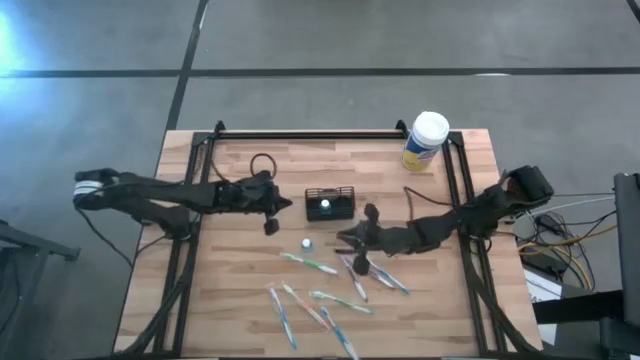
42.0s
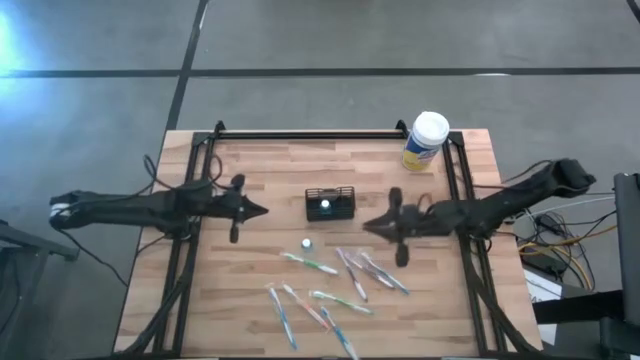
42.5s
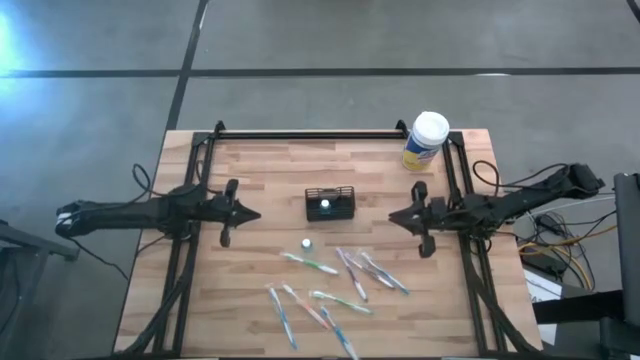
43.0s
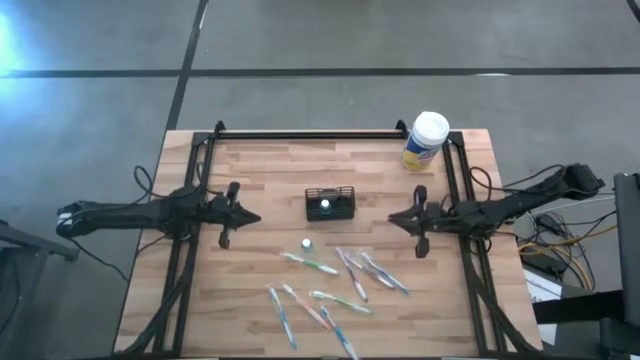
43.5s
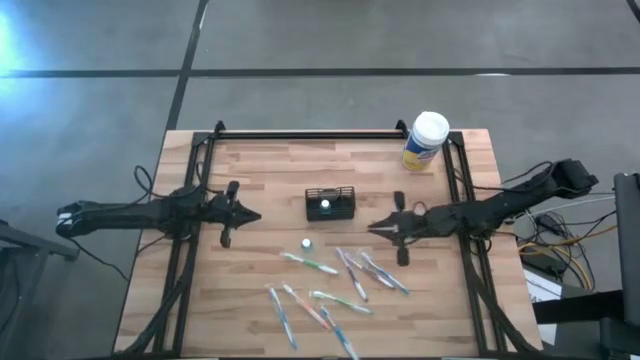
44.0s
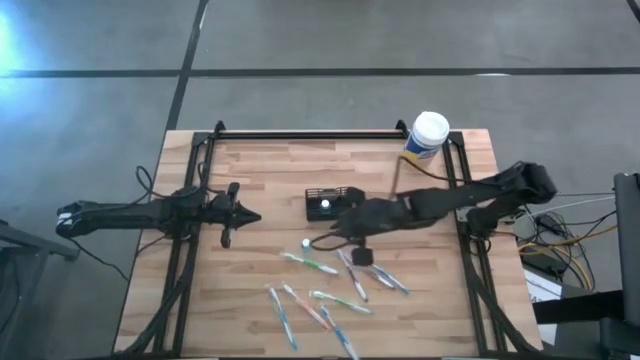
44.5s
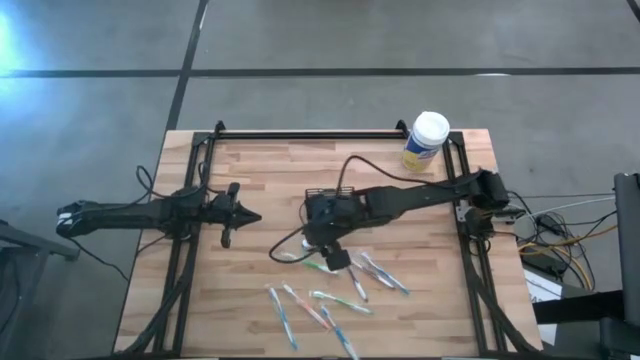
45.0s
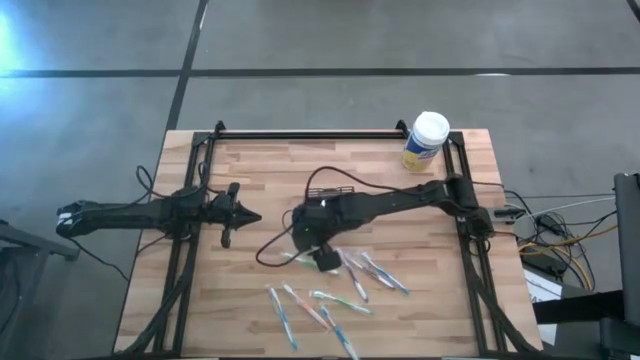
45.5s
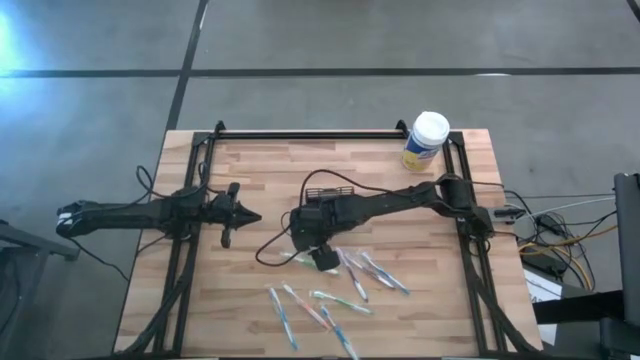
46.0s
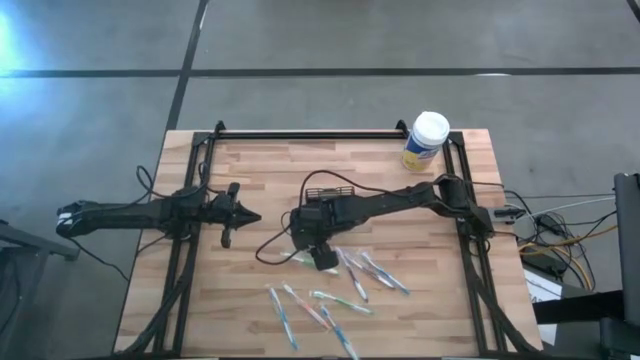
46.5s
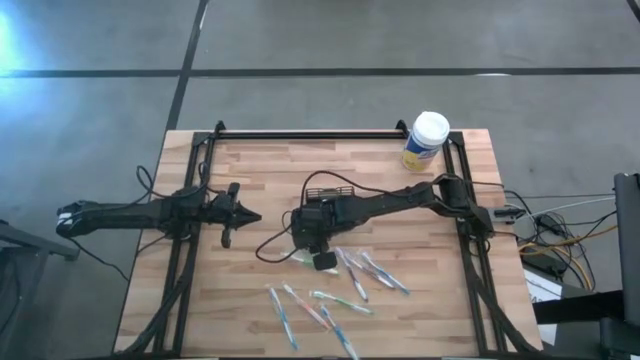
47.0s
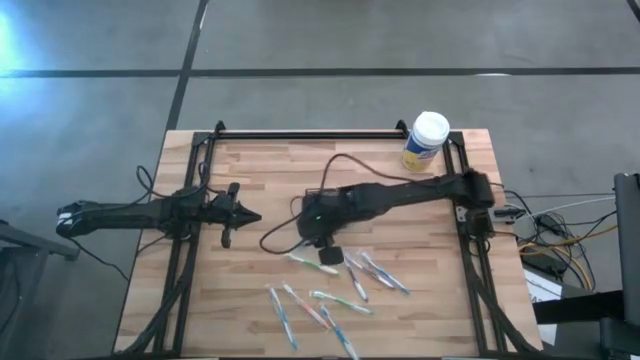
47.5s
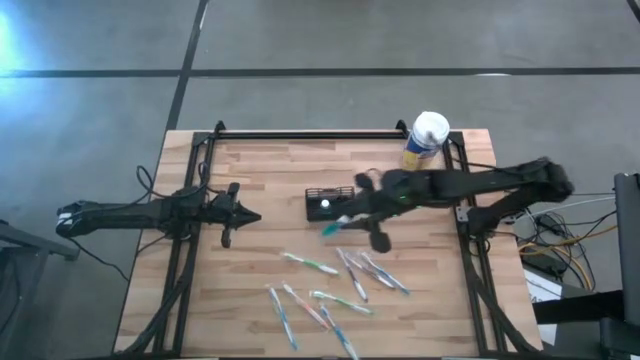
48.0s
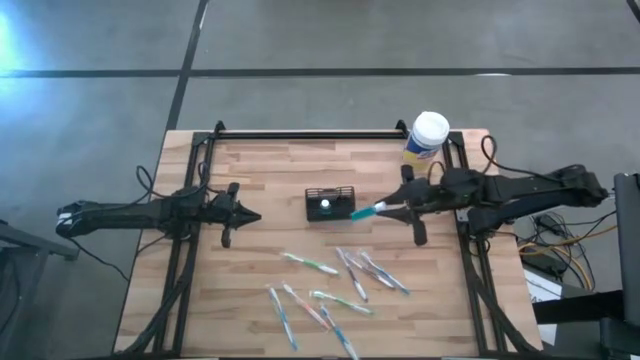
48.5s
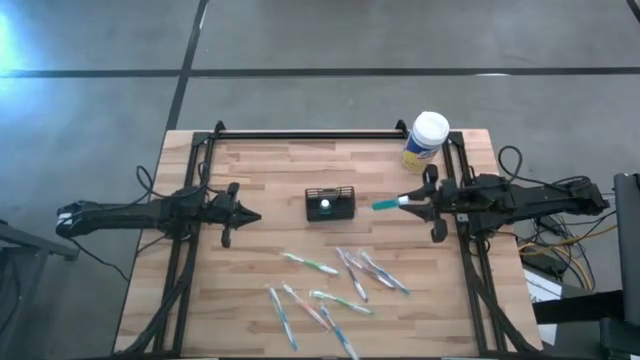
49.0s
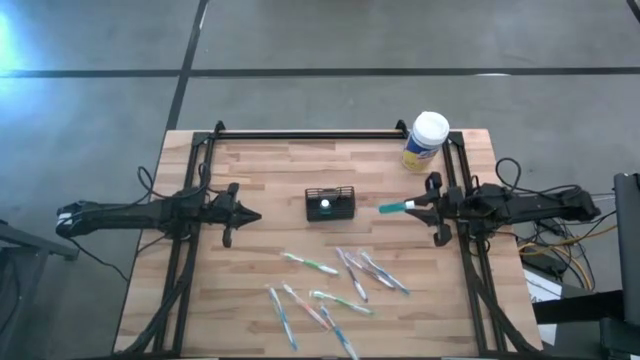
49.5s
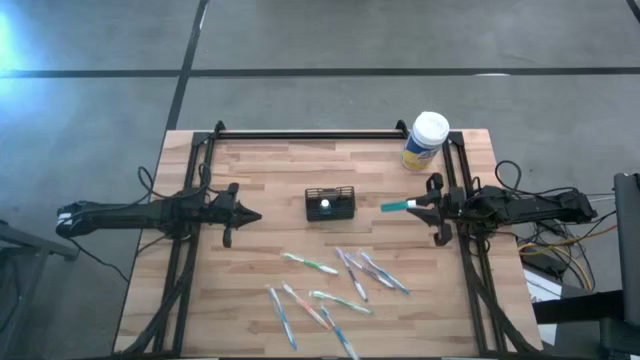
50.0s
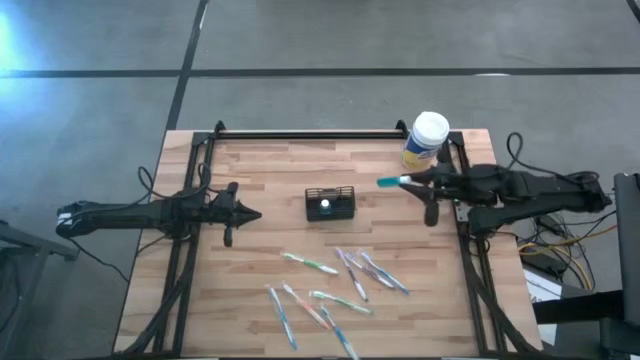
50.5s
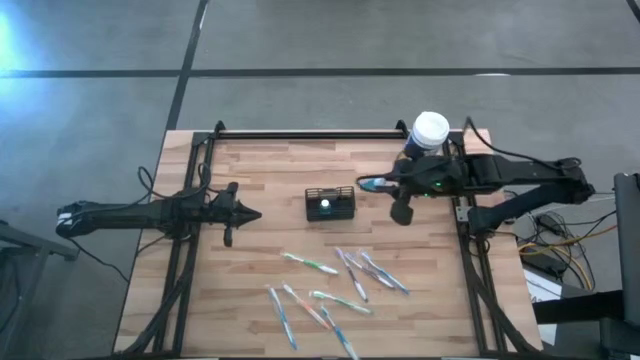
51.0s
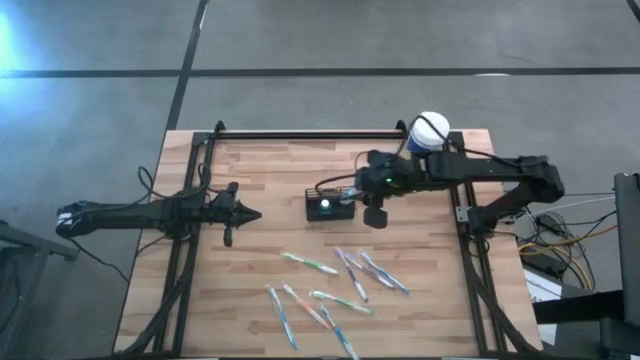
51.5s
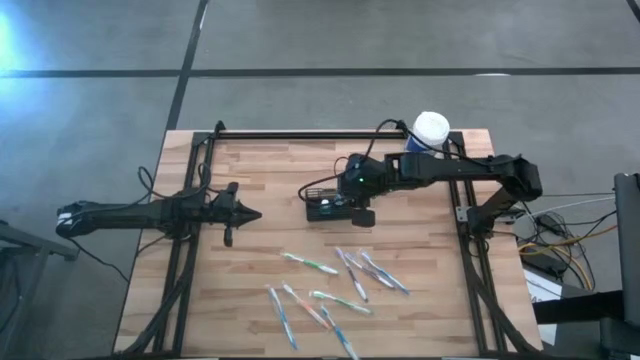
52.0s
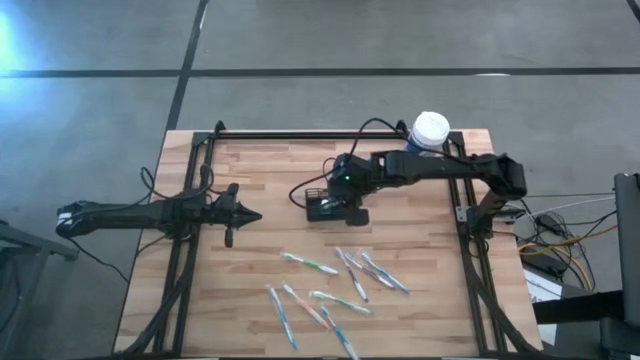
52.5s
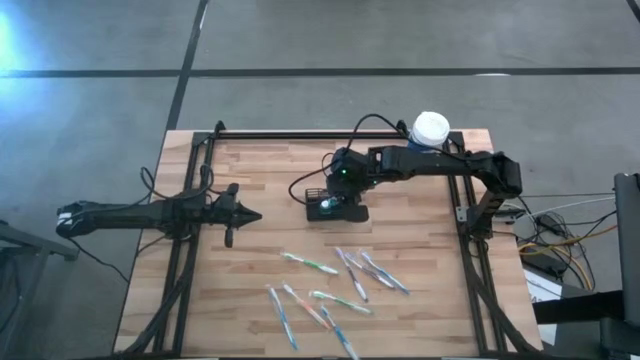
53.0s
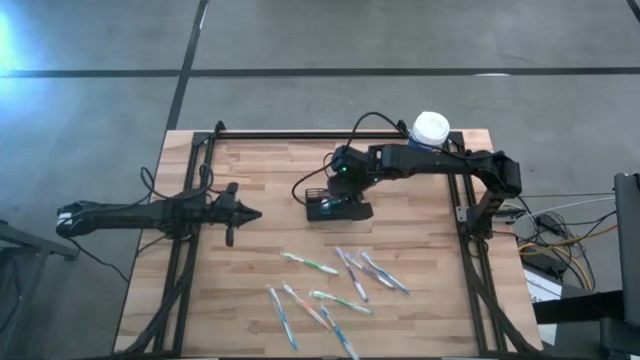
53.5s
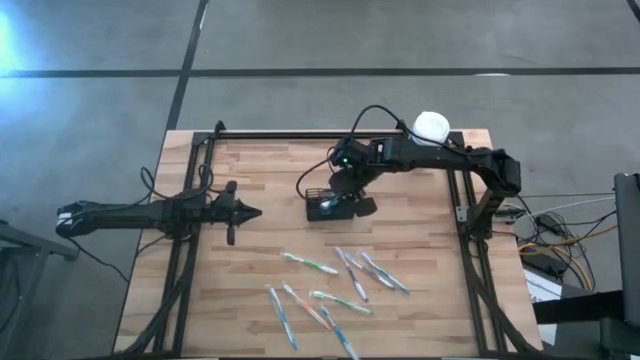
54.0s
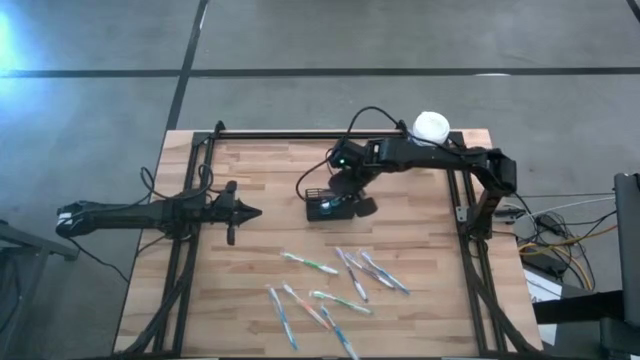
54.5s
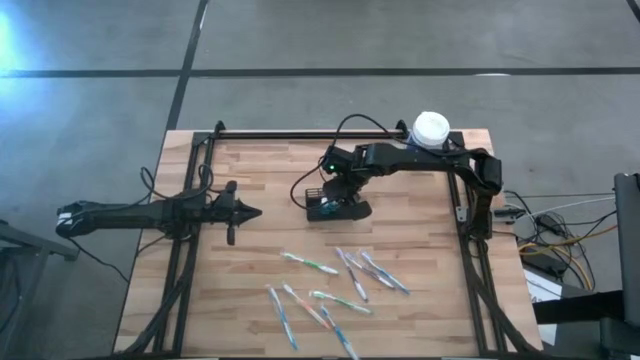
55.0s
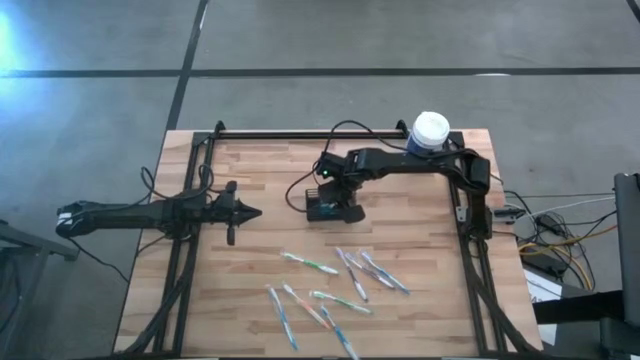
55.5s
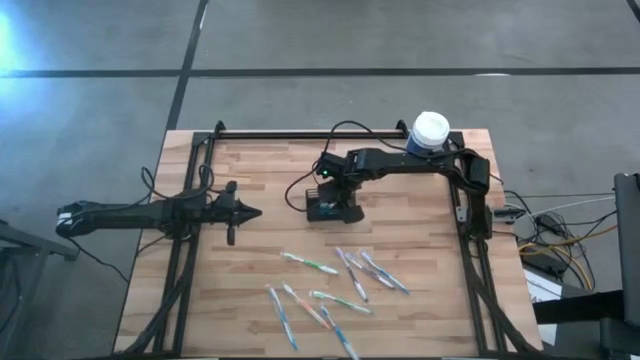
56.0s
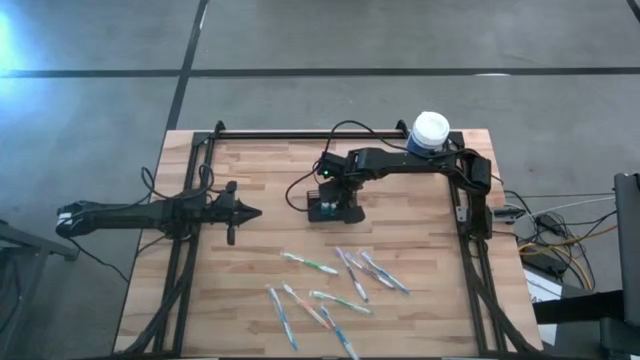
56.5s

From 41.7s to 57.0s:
Task: Pick & Place toothbrushing station
Put the blue mouthwash bottle into the black organizer

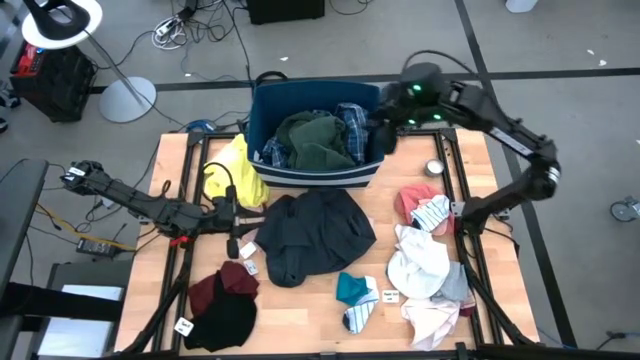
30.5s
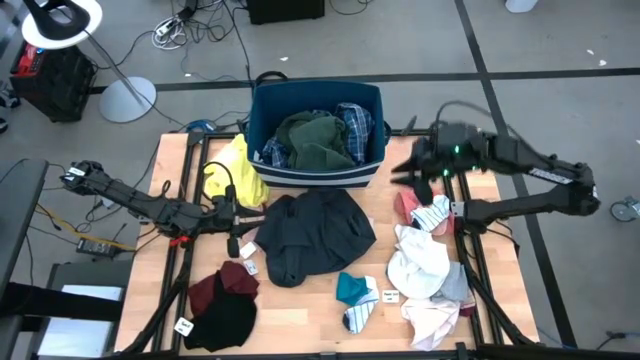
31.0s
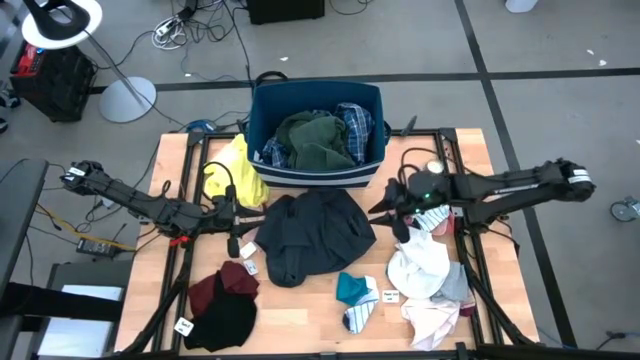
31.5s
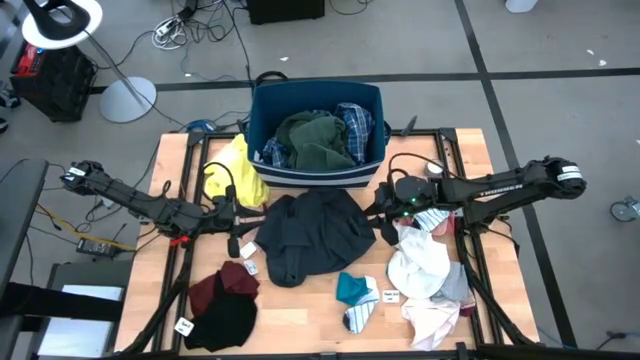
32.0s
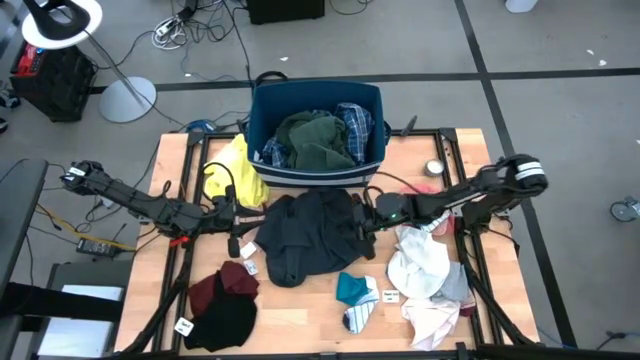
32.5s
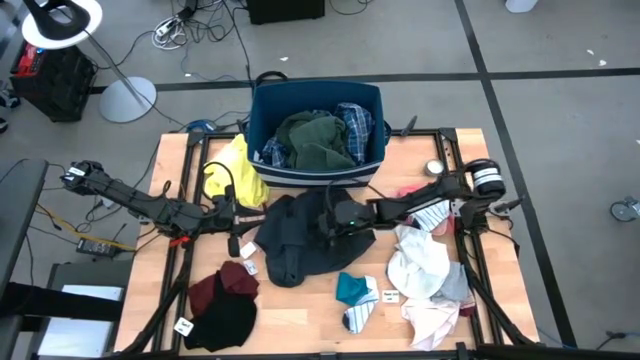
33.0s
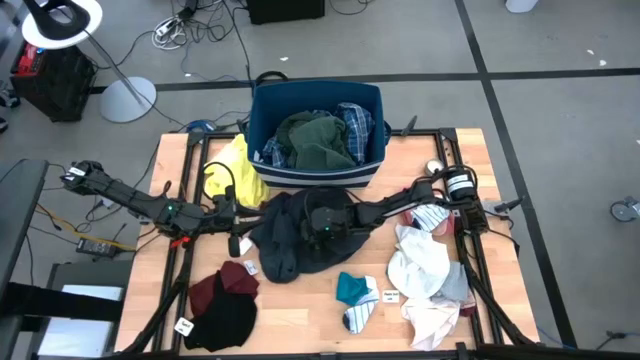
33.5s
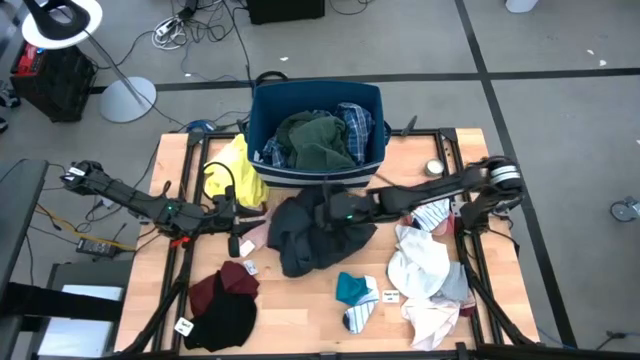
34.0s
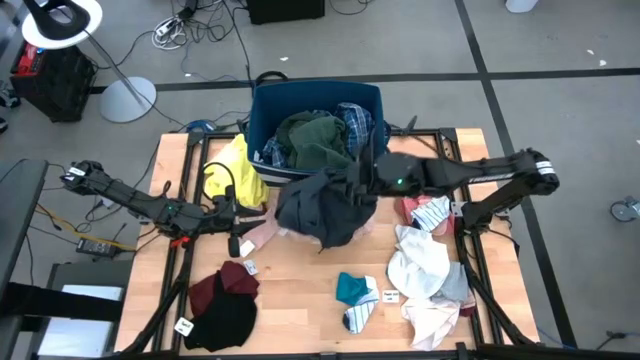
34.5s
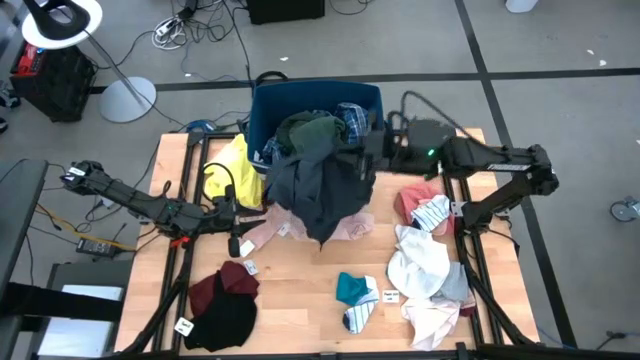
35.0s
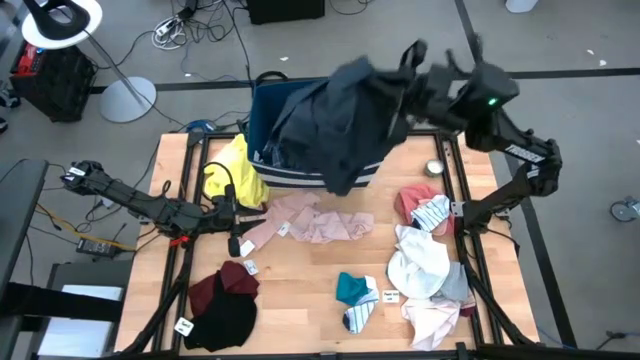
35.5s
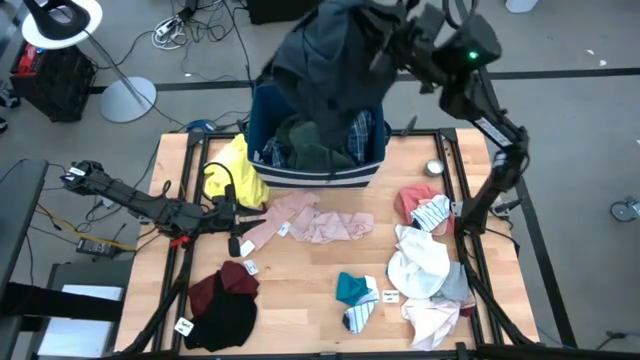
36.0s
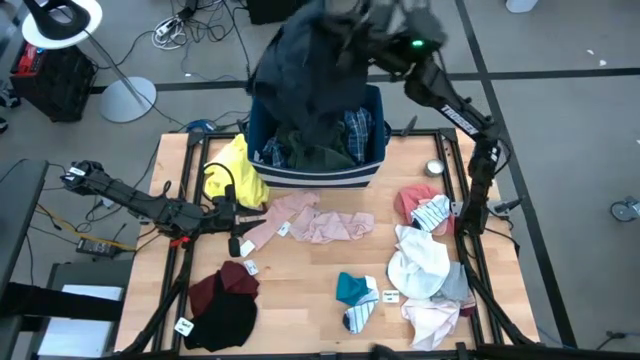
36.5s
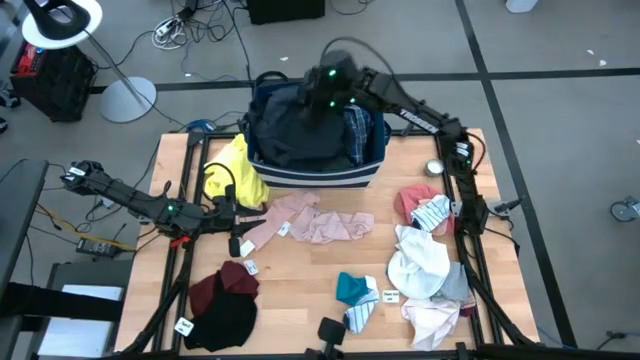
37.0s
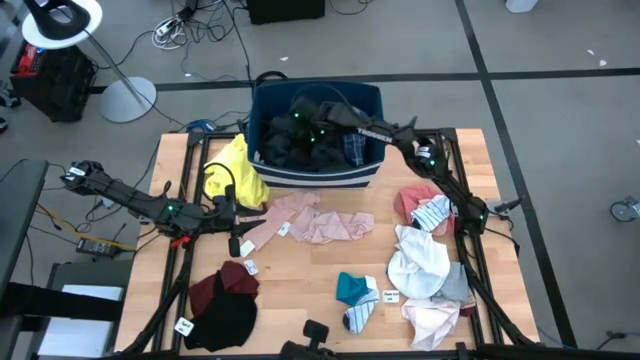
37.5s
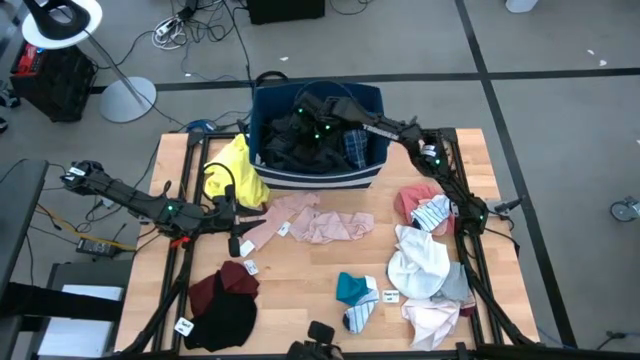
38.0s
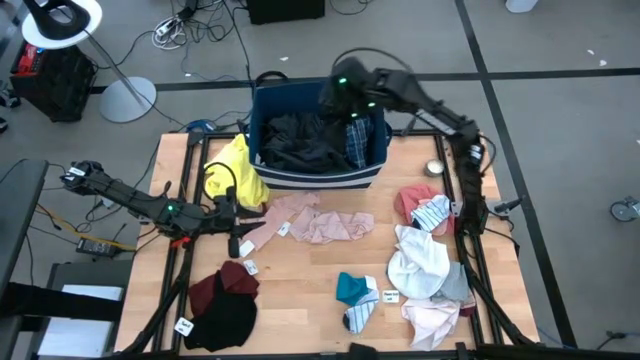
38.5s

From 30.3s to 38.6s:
Task: Sort clothes
Put the black pants into the blue laundry bin
